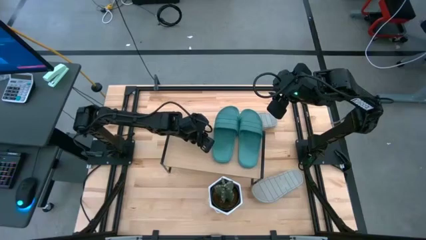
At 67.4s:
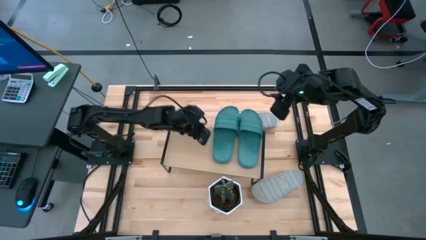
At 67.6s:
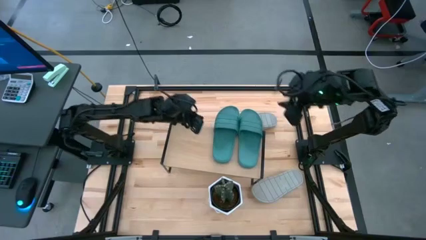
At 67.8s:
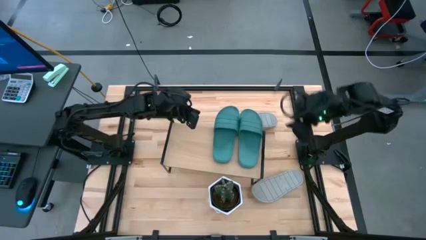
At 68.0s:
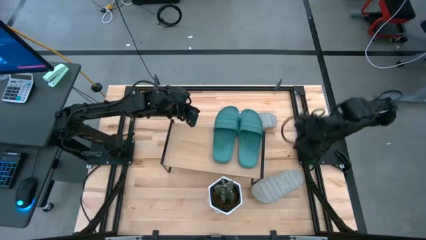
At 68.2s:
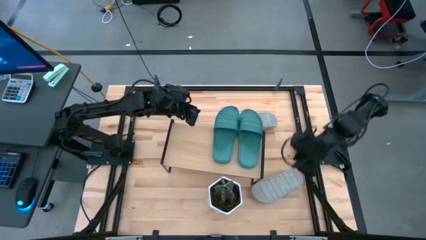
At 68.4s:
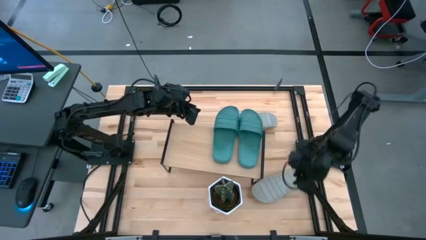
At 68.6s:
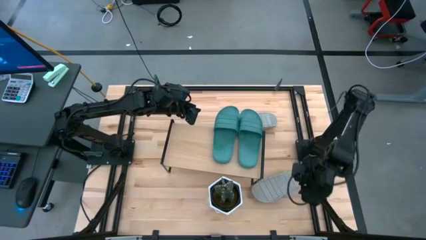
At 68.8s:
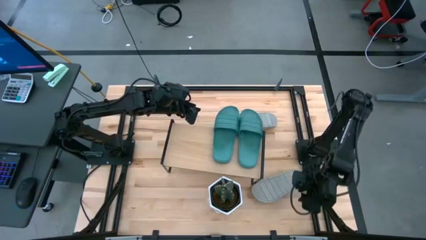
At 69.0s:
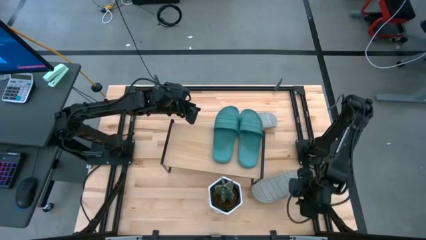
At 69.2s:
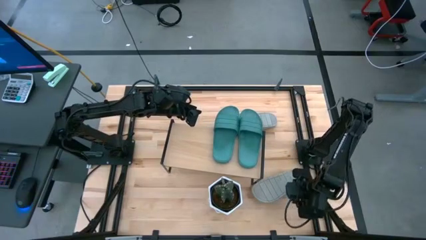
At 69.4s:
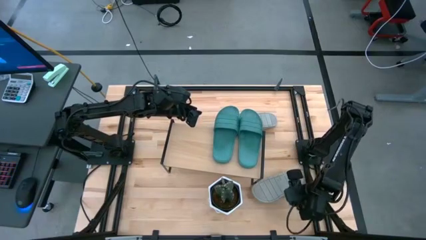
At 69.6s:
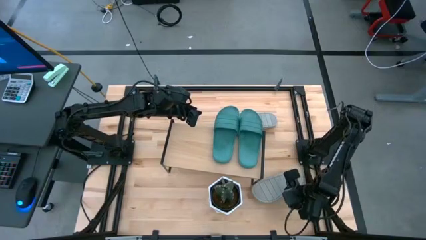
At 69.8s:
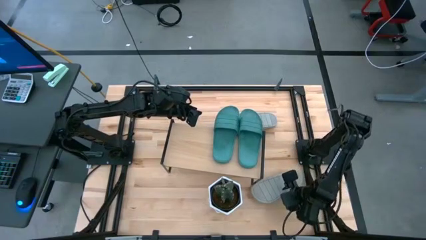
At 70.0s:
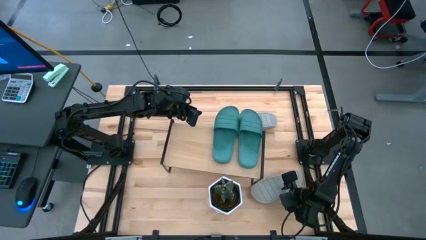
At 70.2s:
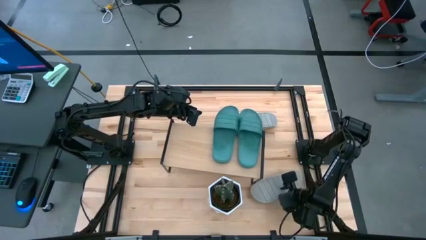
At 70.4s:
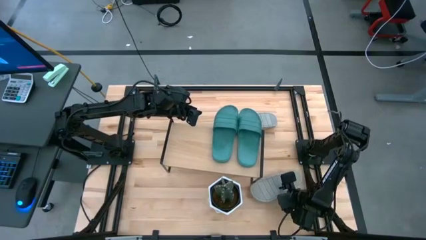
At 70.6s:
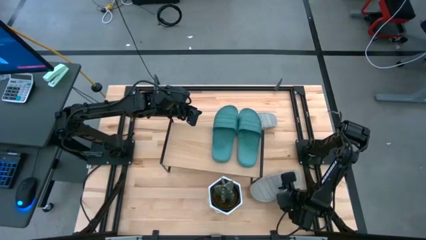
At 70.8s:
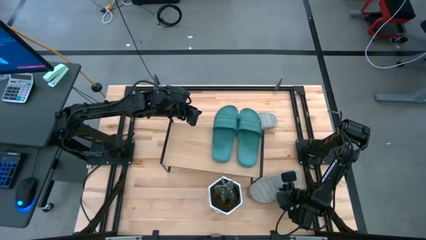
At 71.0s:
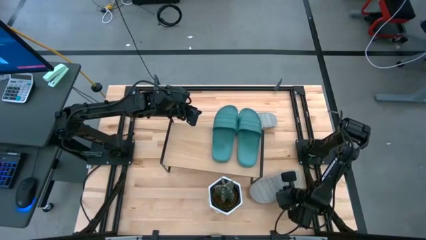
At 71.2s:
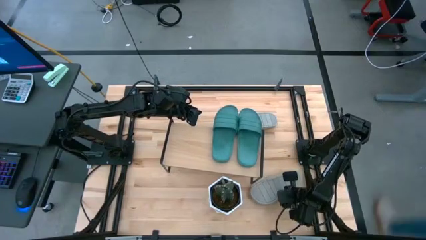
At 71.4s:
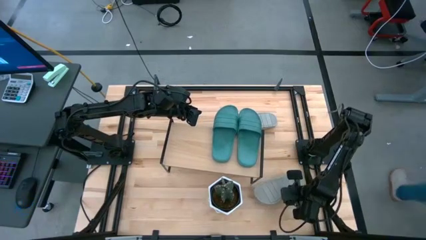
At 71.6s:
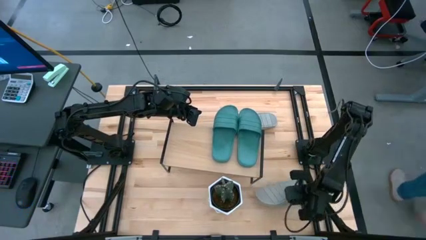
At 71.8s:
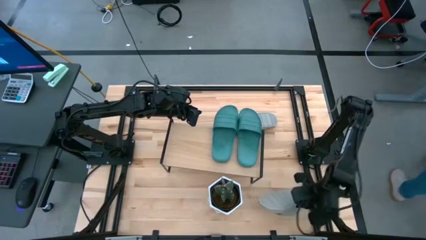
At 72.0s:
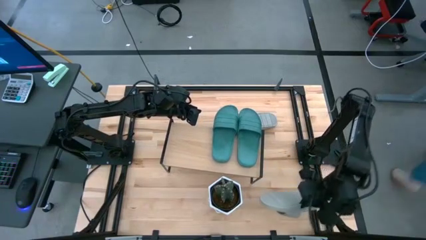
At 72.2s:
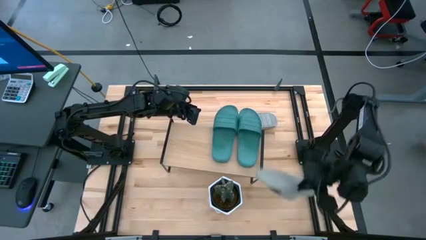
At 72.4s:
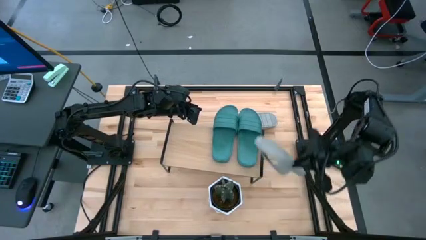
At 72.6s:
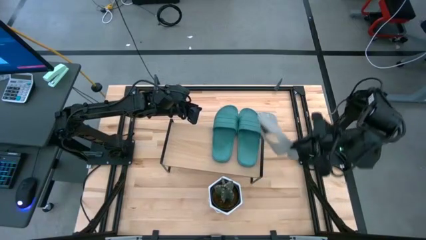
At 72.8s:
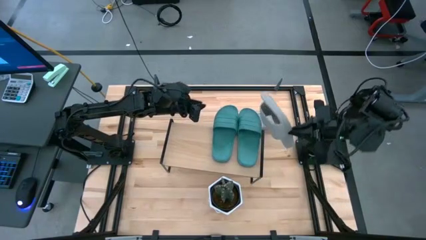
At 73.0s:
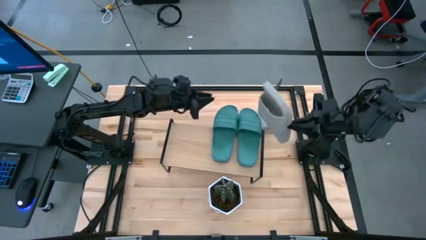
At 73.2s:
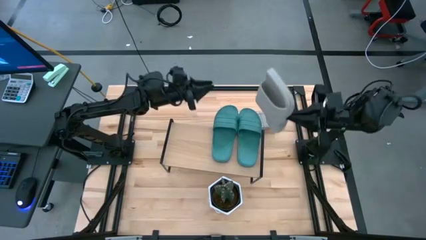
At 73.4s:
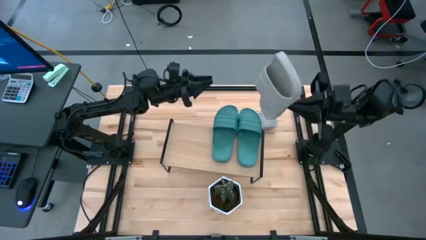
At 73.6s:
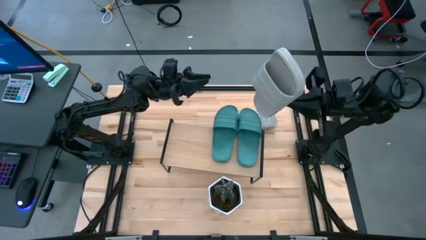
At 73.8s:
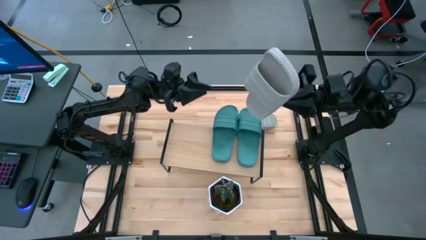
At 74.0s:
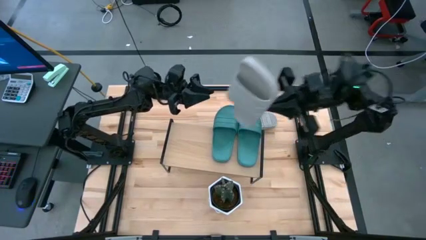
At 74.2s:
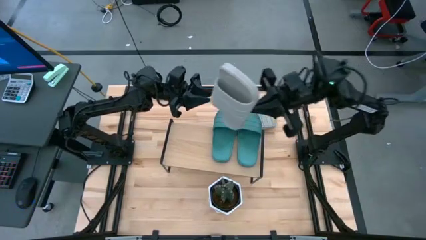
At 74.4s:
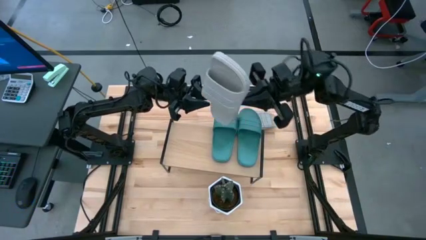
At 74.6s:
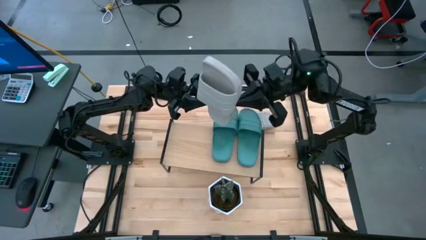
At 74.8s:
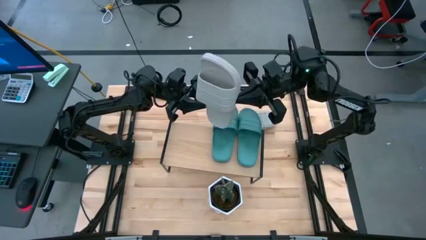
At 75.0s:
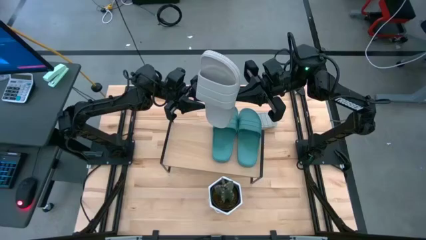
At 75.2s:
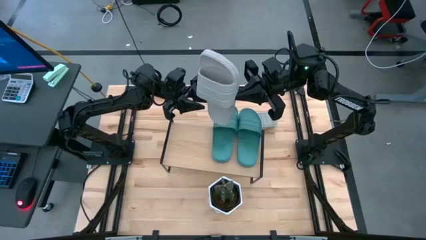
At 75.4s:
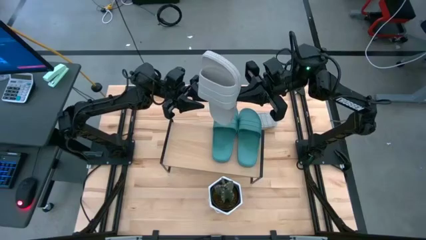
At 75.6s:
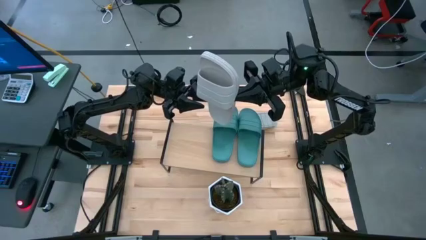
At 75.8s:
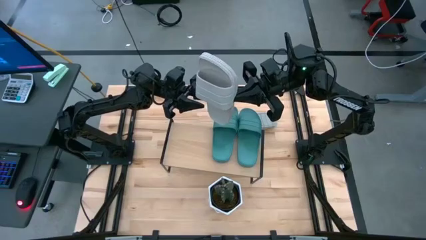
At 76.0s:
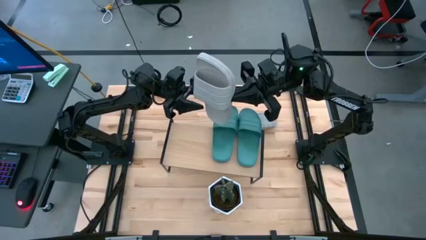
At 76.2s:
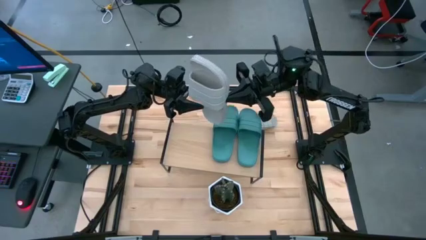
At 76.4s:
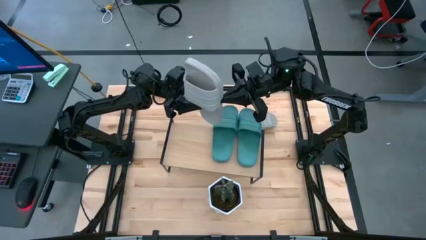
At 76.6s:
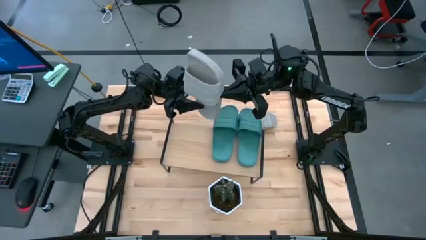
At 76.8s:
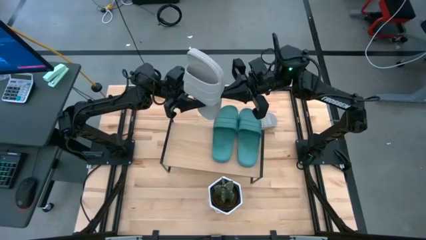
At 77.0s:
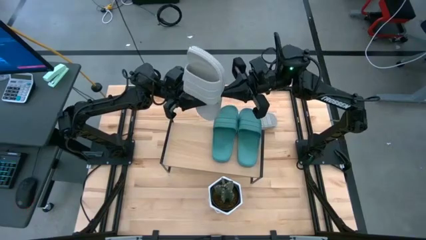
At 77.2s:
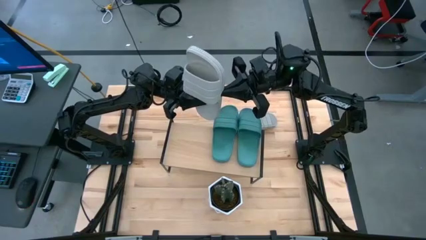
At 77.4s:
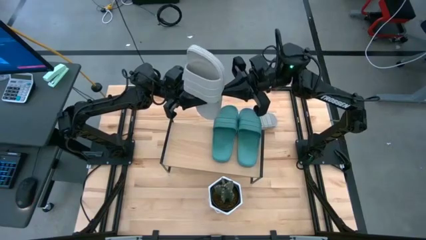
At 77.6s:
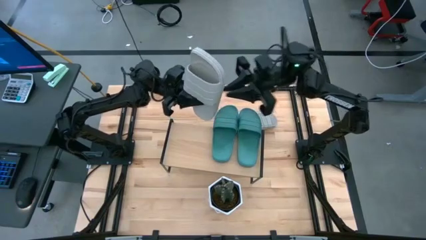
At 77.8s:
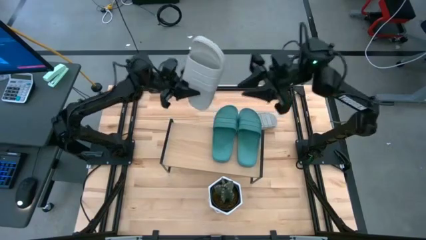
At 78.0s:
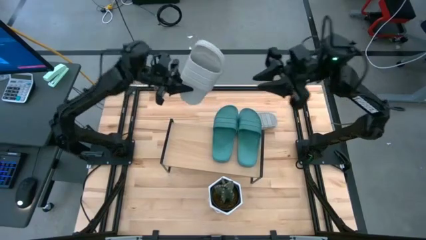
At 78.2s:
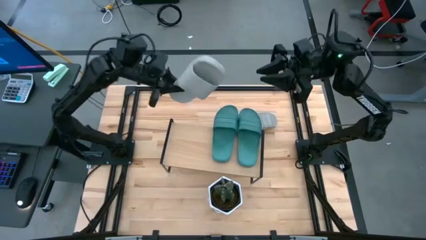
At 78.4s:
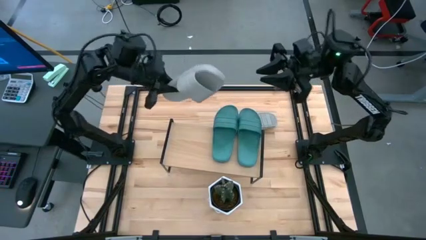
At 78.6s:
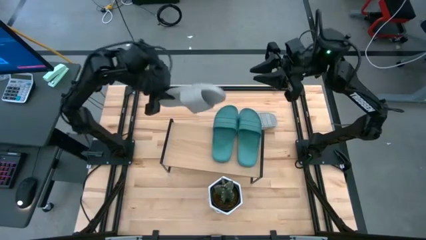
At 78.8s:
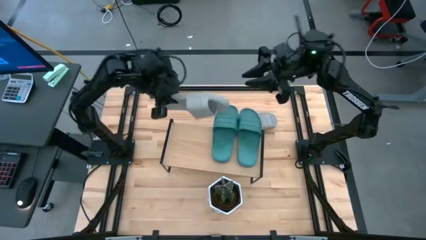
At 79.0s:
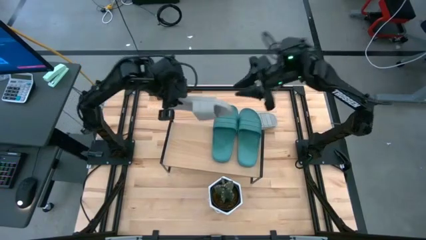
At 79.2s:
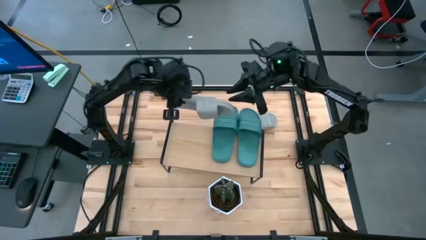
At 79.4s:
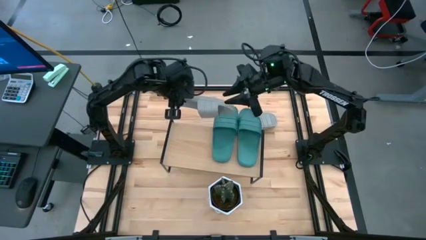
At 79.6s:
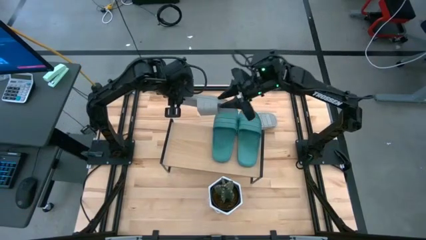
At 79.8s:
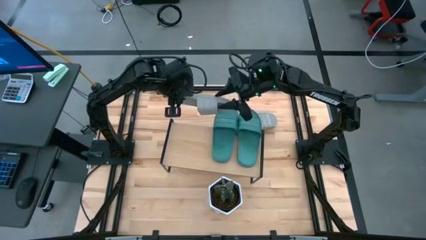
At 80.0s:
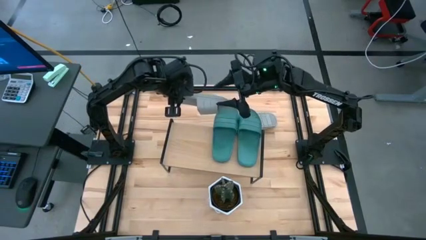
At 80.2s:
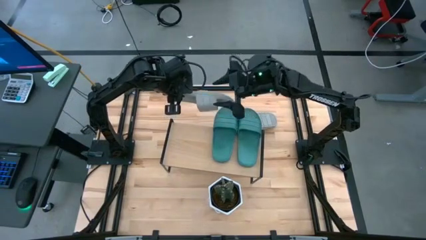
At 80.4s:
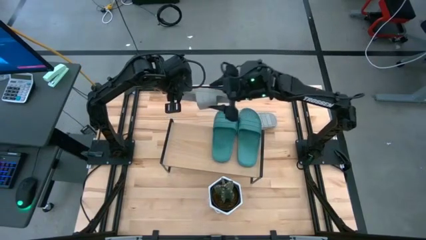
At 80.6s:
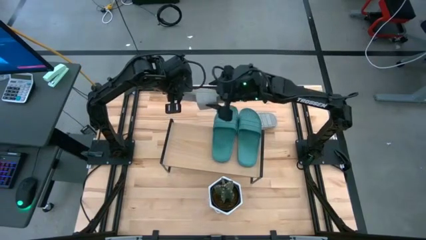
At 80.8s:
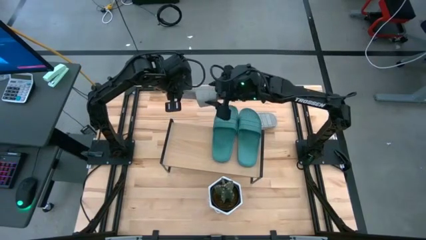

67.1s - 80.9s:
Task: Pick and place slides into the shelf
Put the bottom gray slide on the shelf

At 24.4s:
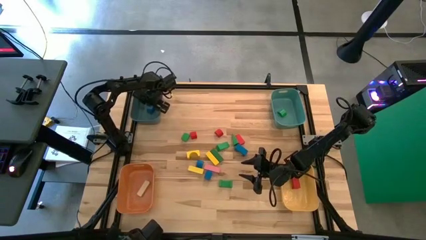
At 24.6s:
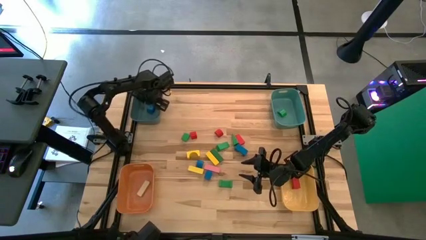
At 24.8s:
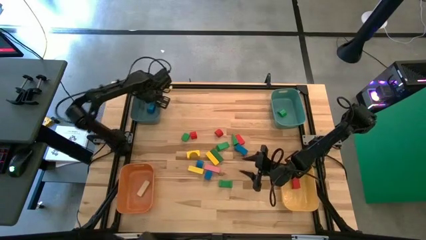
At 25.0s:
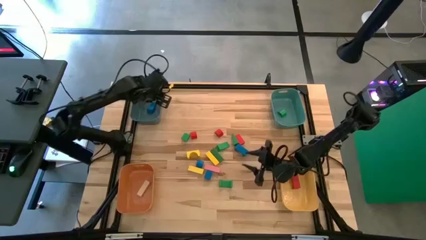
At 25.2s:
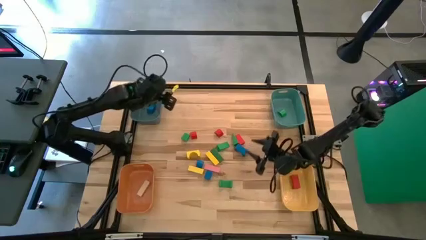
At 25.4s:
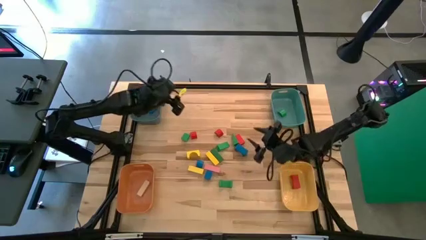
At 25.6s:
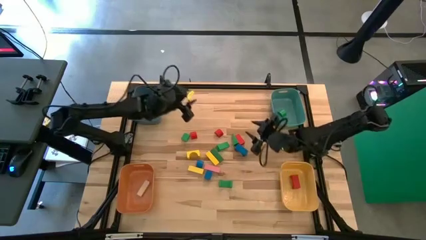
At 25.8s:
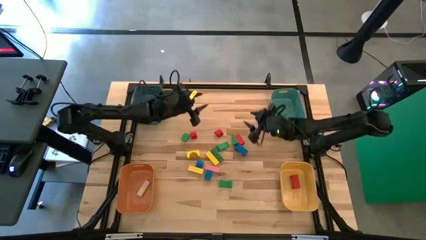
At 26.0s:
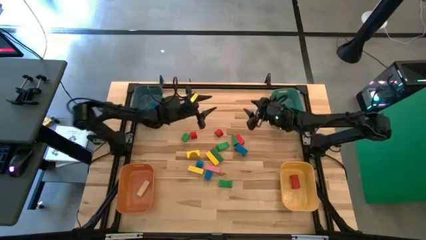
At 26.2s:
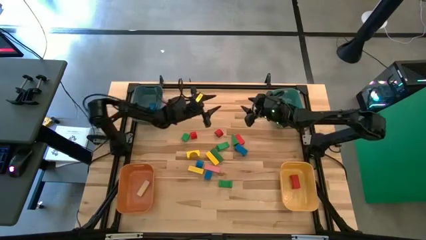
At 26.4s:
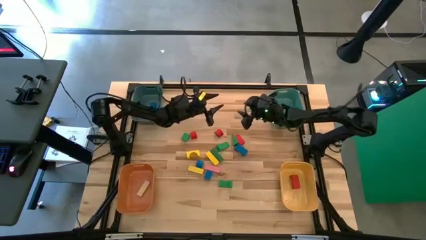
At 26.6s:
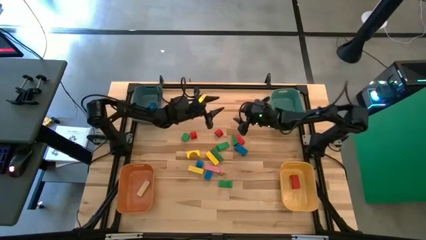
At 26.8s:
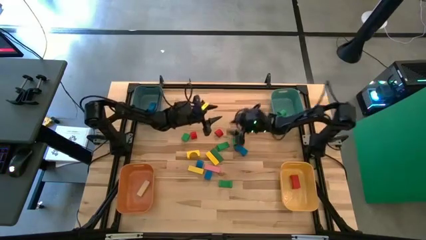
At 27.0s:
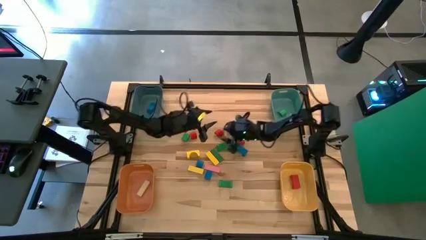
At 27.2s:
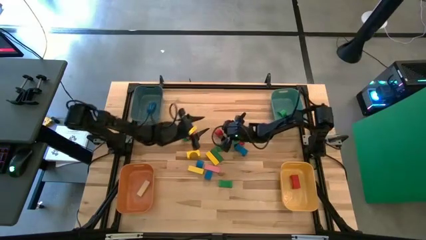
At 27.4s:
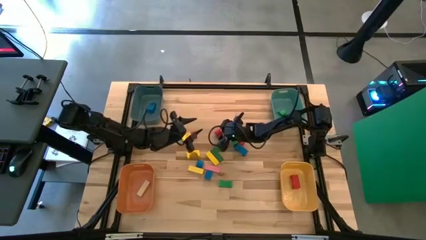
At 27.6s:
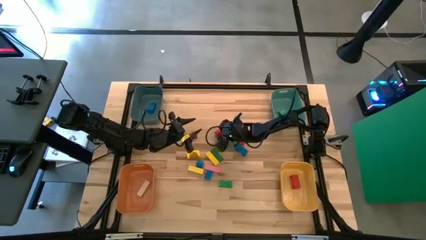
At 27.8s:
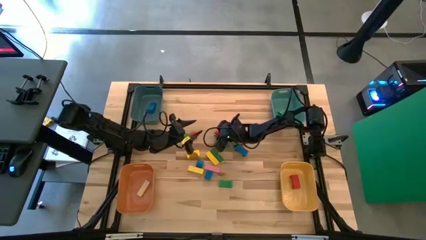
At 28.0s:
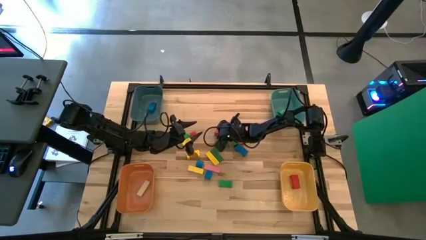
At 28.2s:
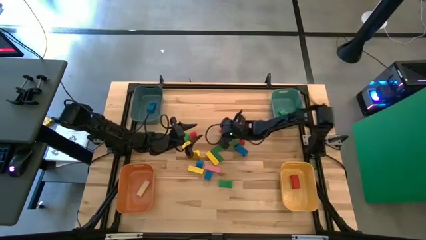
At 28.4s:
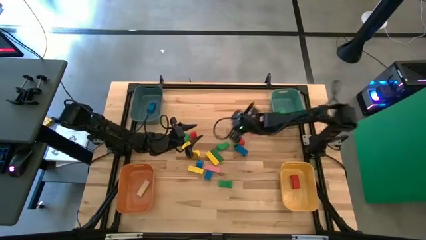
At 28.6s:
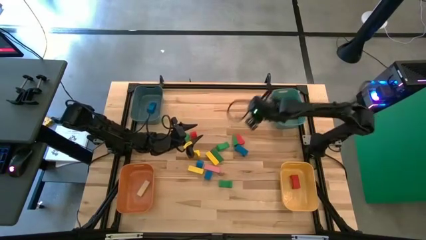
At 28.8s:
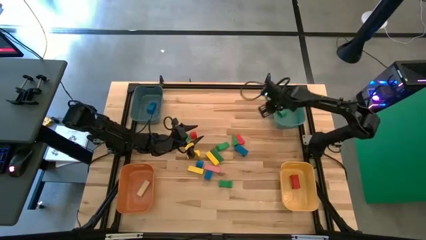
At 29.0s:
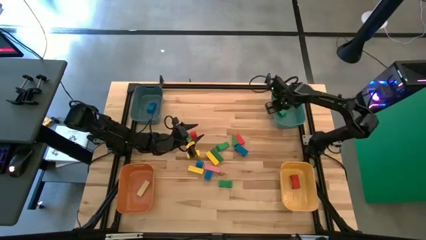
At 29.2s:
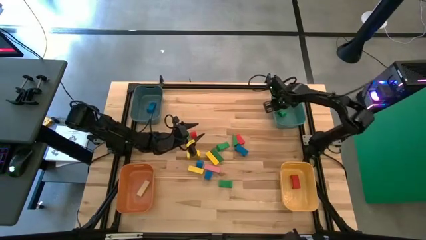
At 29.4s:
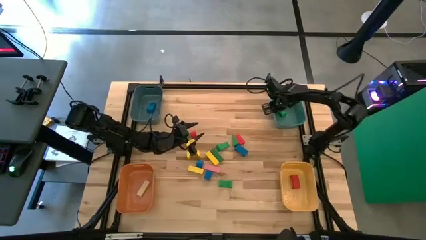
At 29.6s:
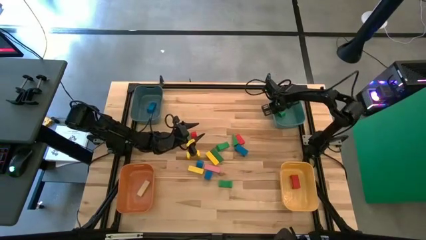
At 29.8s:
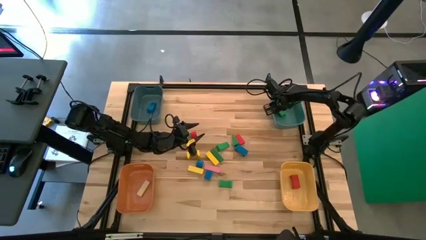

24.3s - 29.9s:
Task: Sort blocks by size
Put the red semicircle block into the green bin
